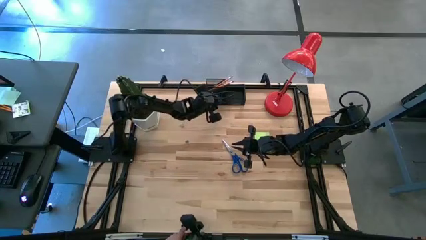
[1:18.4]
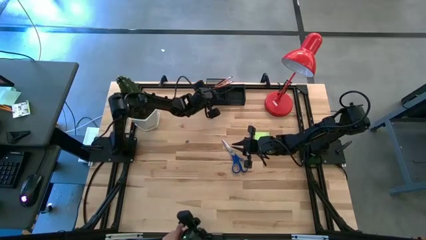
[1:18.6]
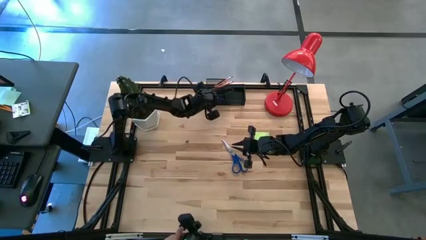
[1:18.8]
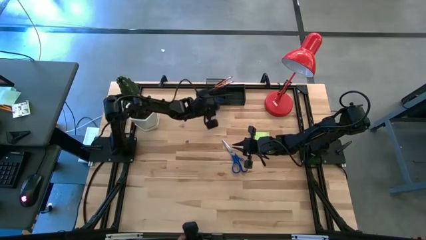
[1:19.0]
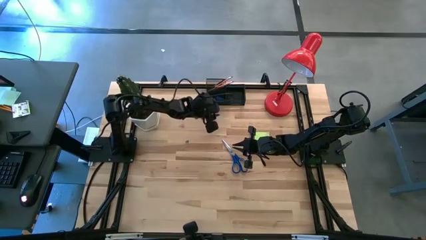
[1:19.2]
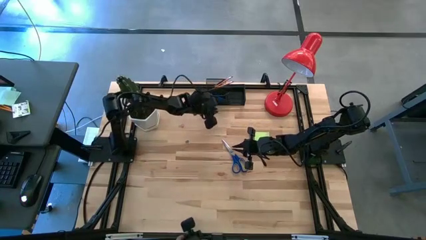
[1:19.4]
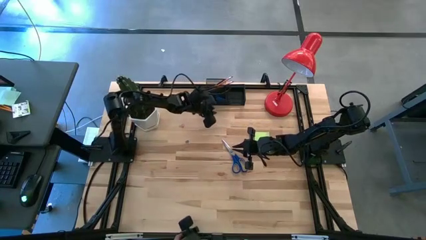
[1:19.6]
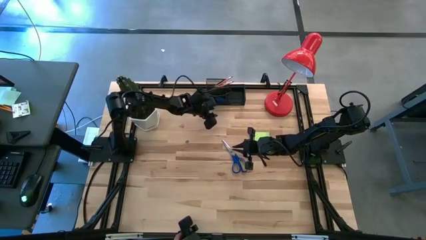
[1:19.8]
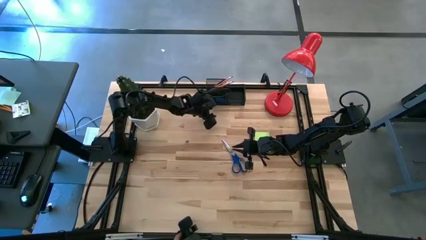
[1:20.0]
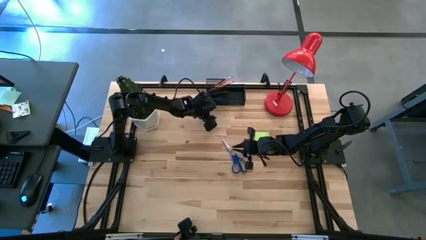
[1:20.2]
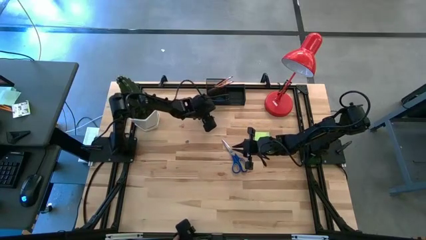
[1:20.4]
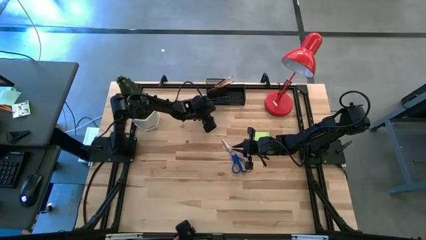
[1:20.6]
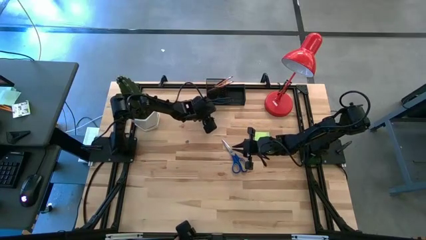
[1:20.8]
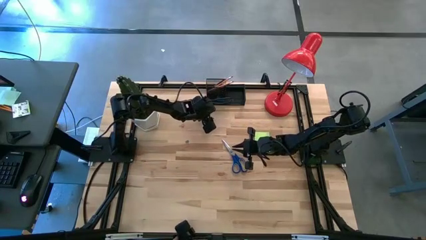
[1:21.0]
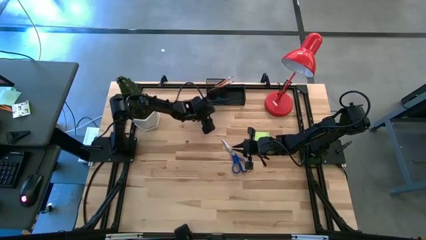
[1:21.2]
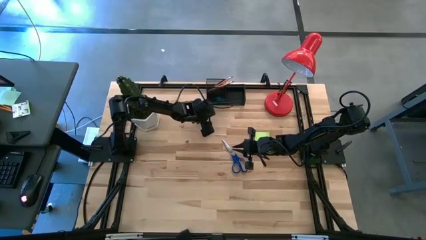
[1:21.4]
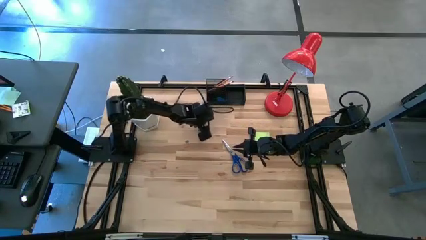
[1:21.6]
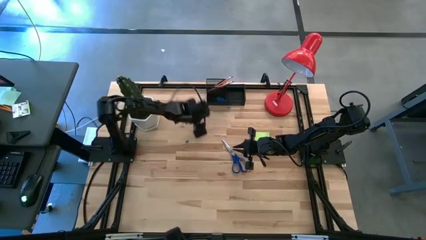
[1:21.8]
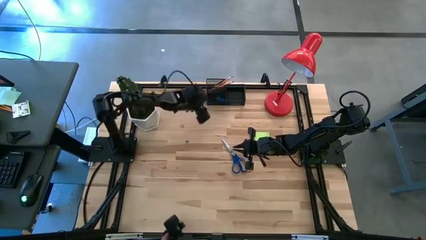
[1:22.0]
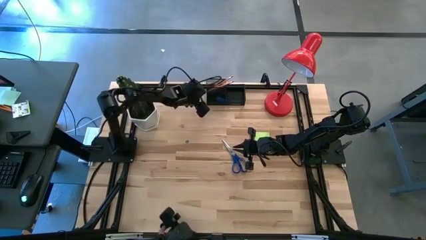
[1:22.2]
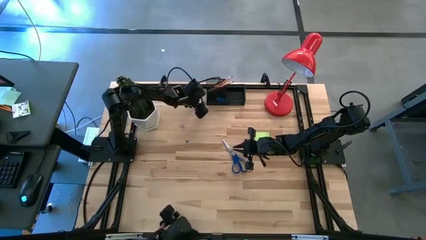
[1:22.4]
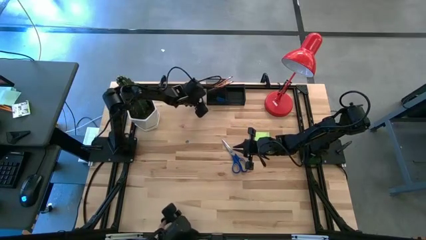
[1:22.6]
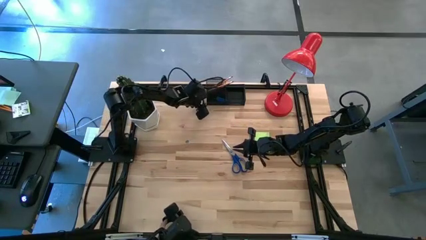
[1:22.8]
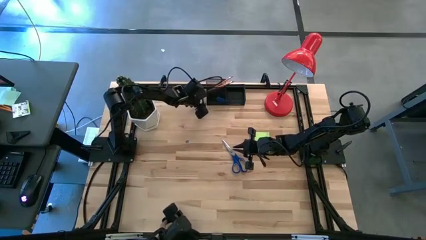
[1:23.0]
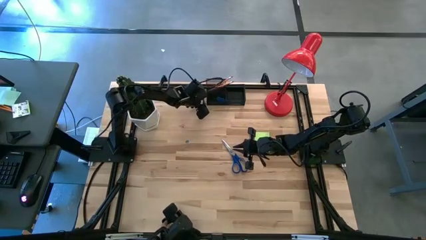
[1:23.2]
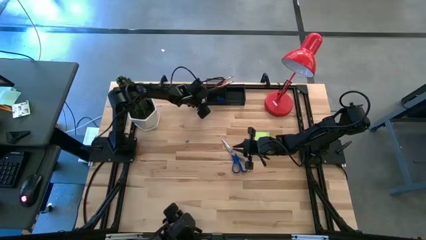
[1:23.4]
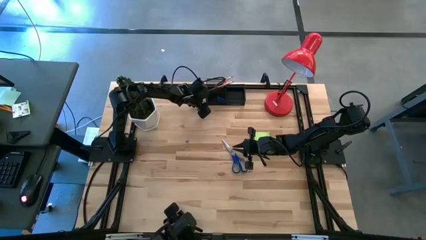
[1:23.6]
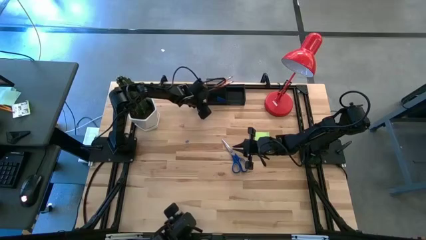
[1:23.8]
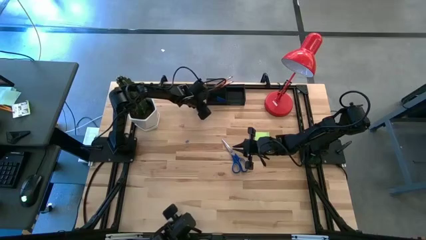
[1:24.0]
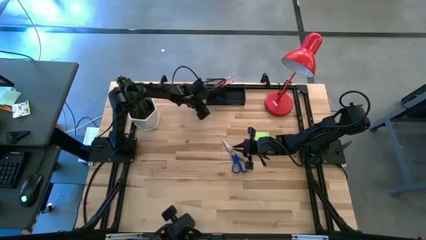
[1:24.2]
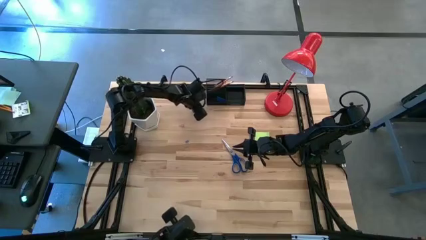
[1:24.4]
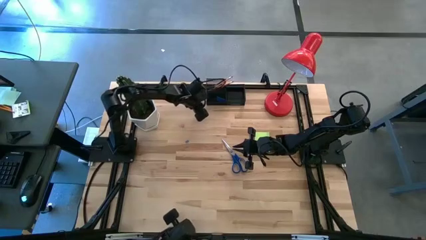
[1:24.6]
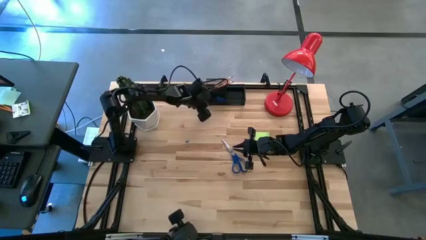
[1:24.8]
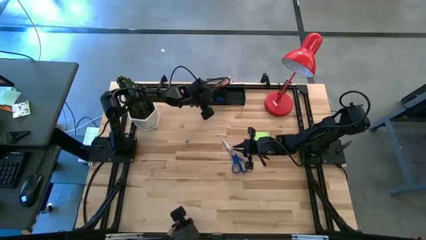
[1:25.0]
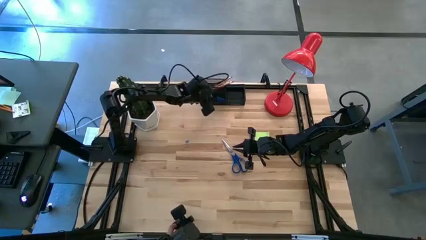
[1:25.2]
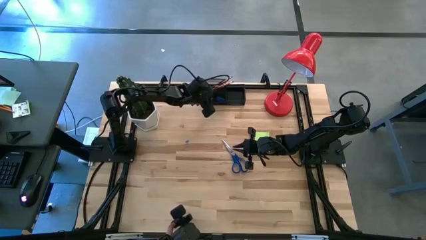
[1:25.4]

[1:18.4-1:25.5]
Task: Pick and place office supplies into organizer
Put the top blue binder clip into the bottom left section of the desk organizer

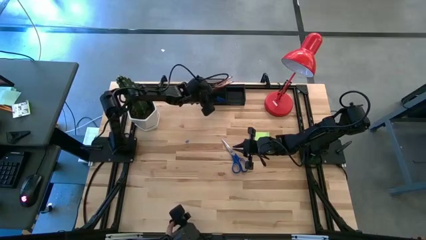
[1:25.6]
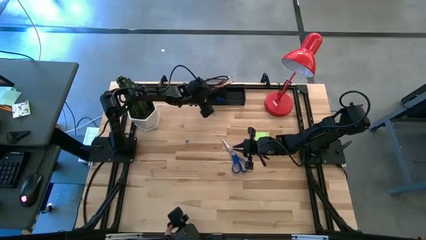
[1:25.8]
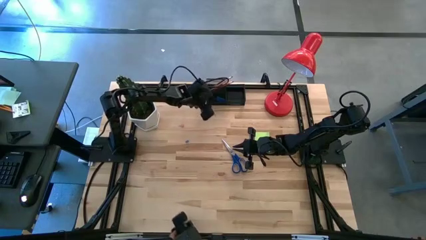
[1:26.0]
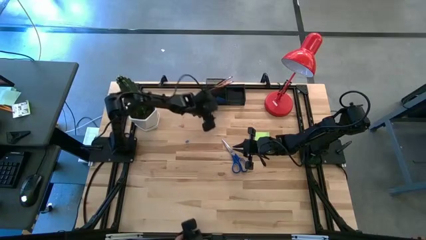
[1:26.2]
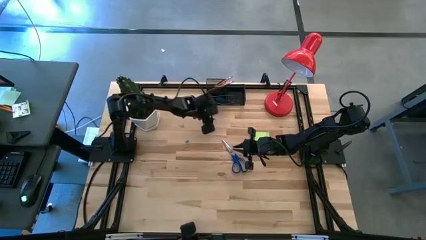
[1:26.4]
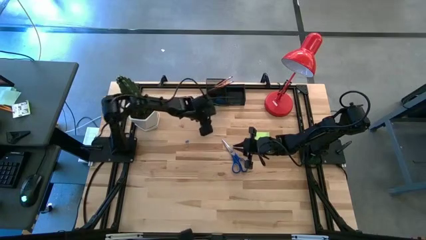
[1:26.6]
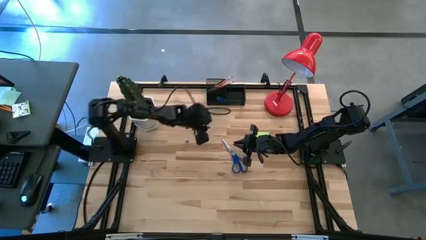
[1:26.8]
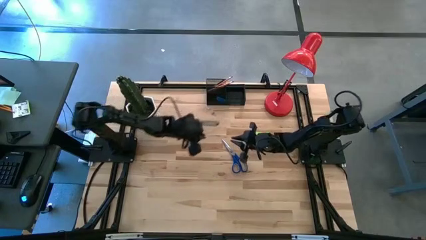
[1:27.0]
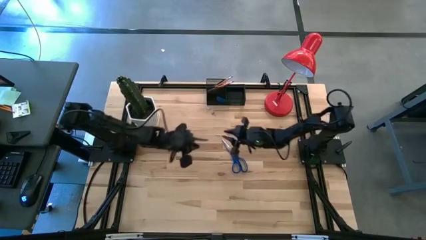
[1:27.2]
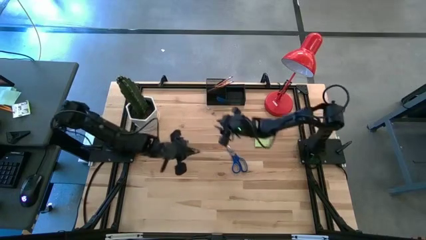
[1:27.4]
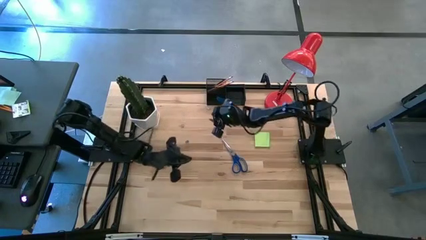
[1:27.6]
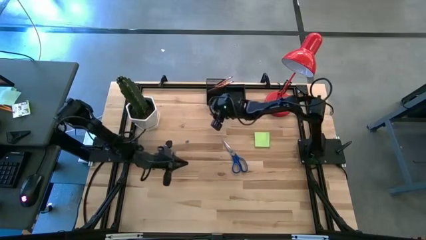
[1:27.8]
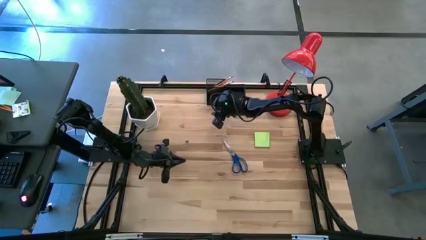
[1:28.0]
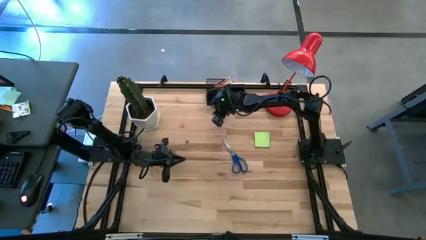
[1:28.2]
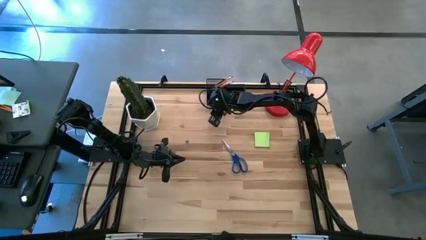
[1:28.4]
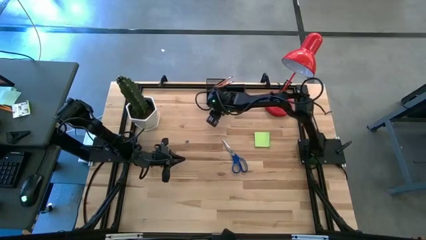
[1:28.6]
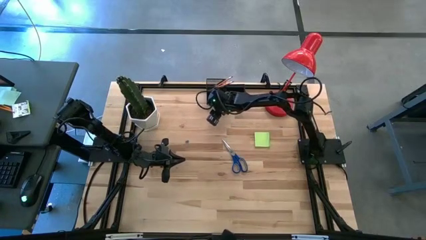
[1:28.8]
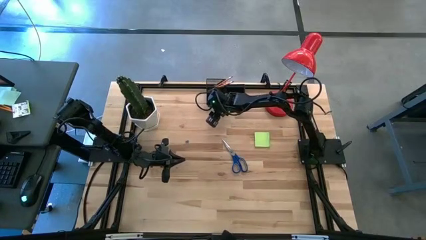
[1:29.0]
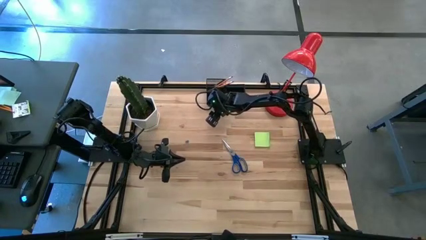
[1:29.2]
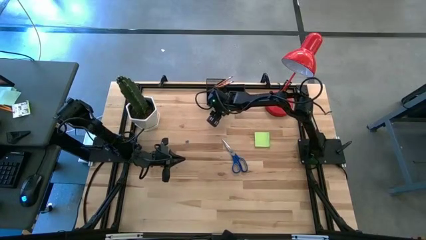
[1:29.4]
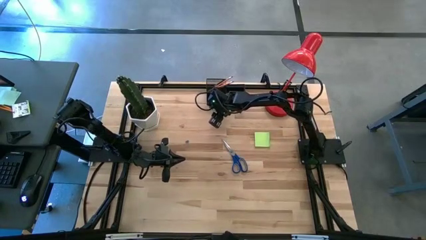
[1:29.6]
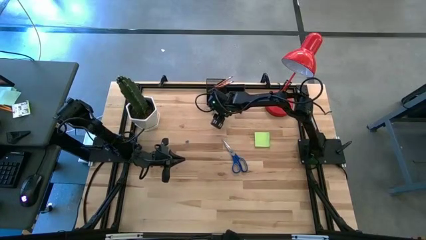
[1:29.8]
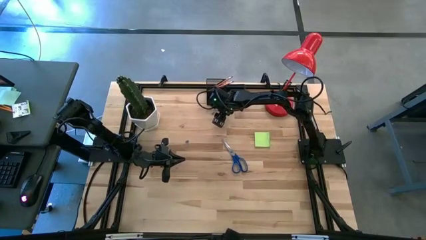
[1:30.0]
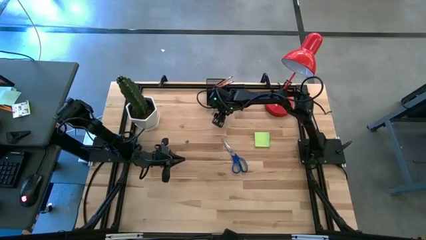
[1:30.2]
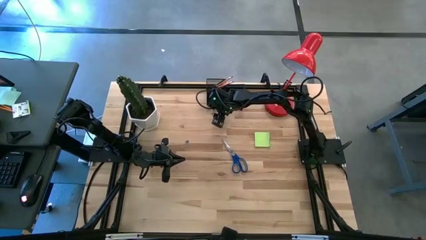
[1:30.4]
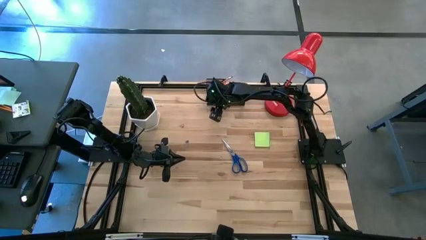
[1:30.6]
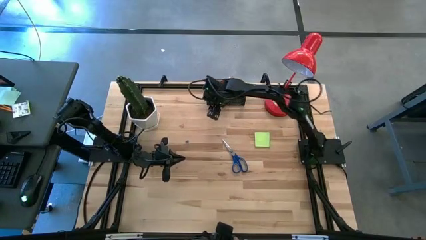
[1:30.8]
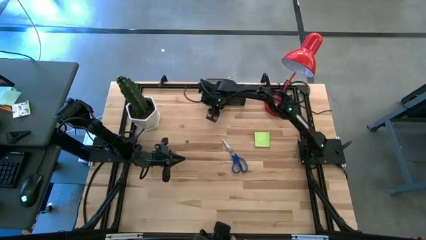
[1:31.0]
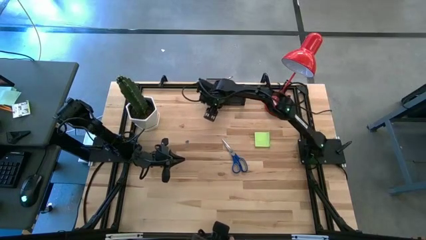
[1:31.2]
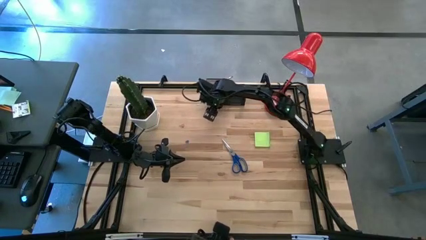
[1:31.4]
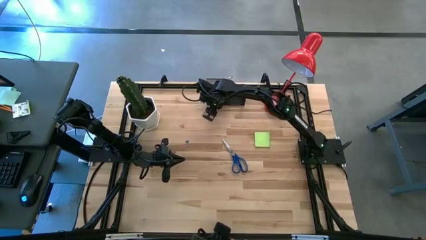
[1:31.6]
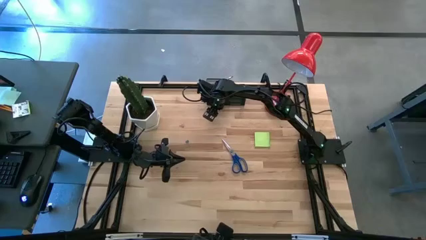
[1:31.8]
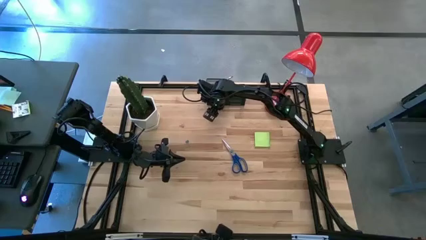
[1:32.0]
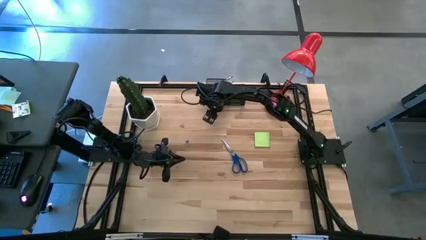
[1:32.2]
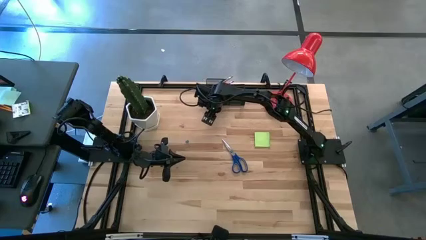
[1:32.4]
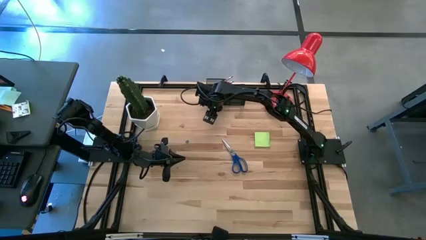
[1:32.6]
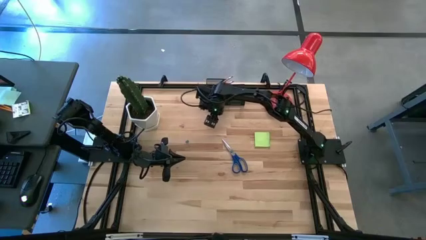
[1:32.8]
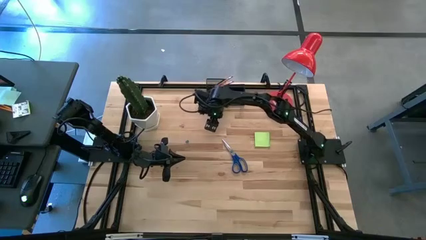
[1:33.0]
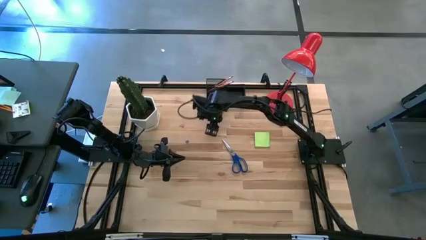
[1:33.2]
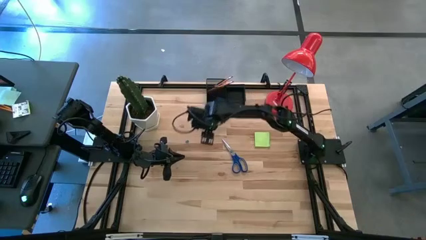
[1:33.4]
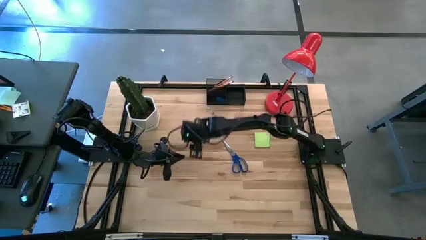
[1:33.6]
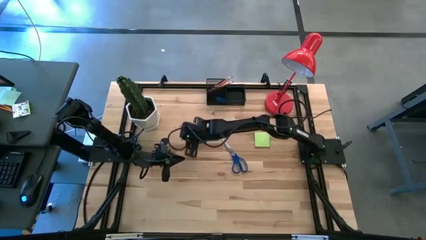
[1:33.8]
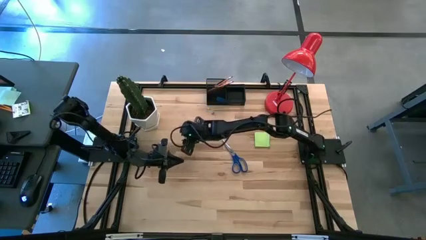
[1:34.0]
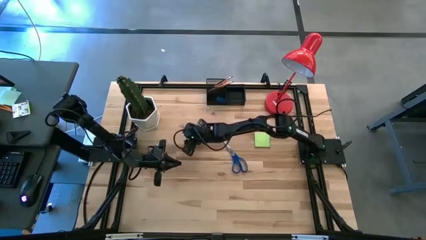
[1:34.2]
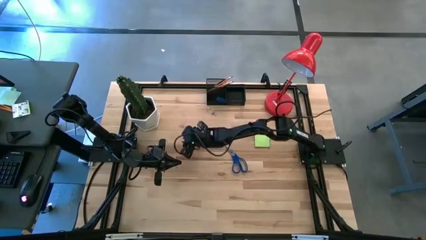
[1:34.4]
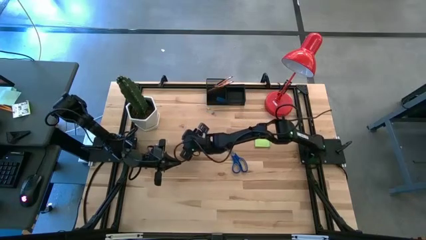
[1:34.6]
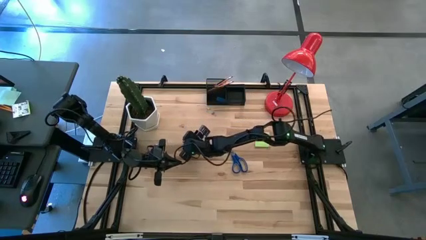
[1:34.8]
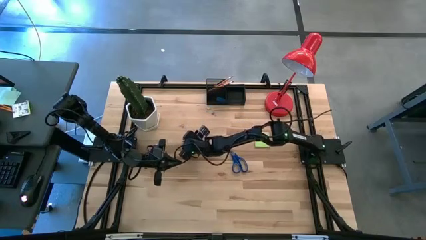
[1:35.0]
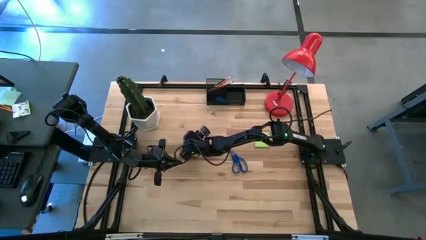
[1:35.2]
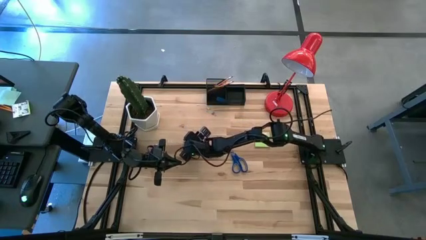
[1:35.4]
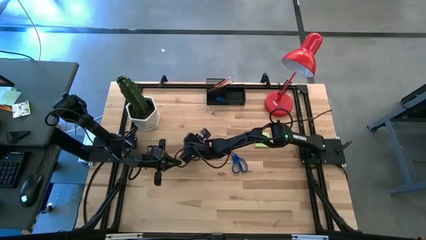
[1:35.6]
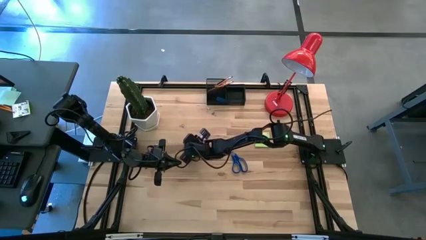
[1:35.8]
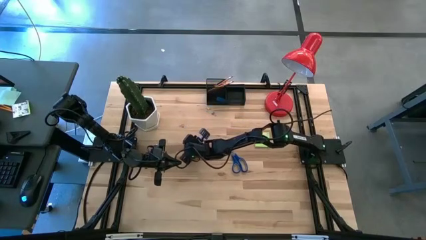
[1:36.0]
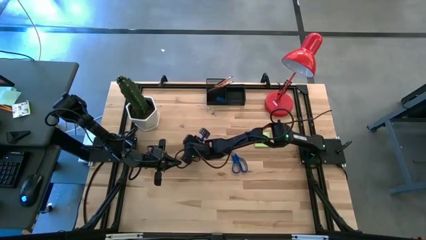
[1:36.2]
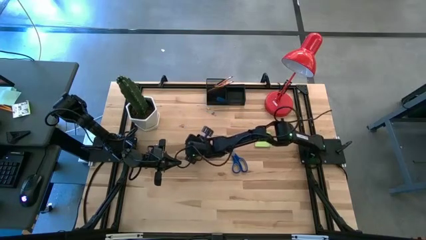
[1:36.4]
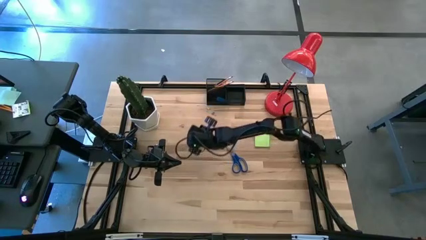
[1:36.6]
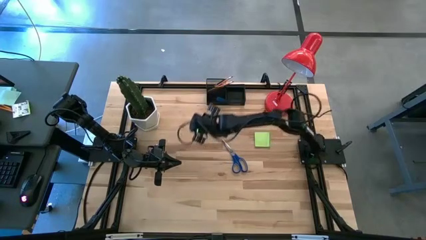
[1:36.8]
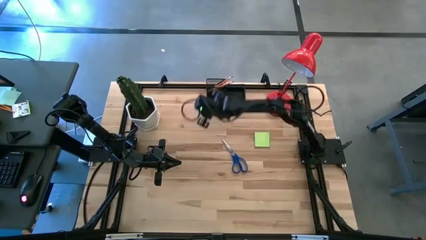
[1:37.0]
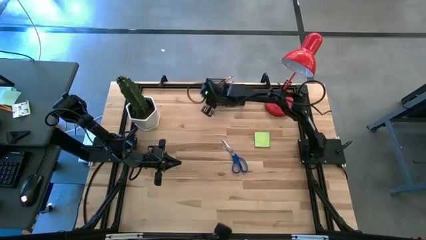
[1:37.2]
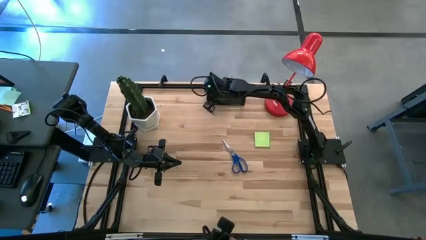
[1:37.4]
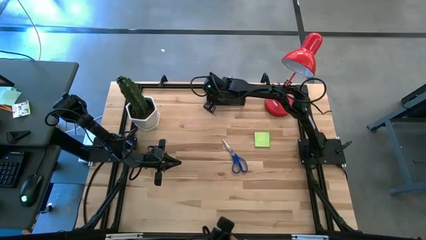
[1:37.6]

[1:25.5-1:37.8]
Put the bottom blue binder clip into the bottom left section of the desk organizer
